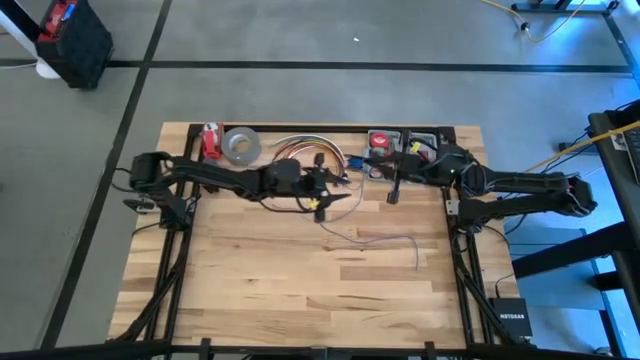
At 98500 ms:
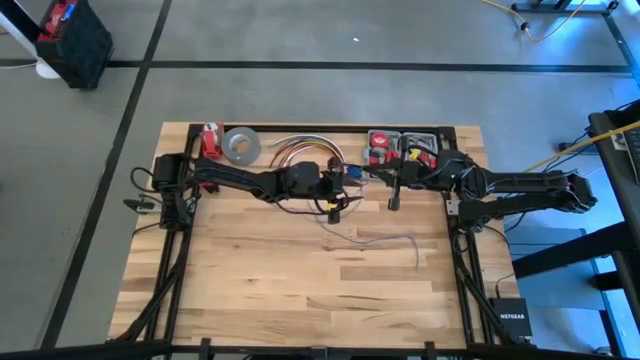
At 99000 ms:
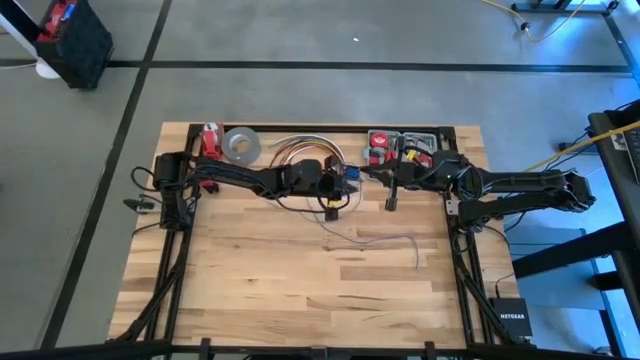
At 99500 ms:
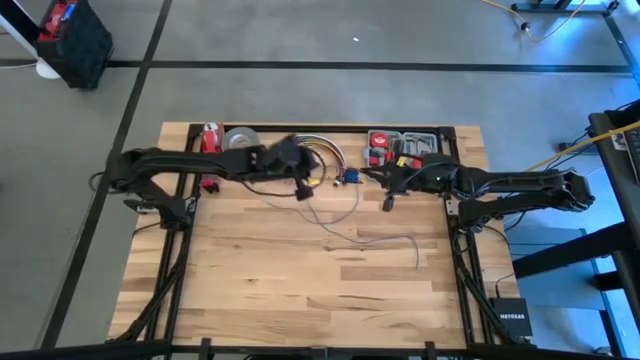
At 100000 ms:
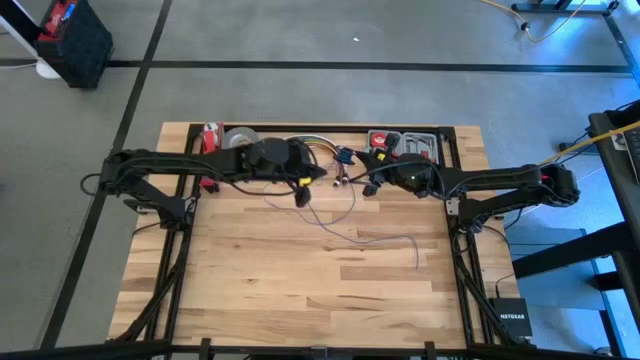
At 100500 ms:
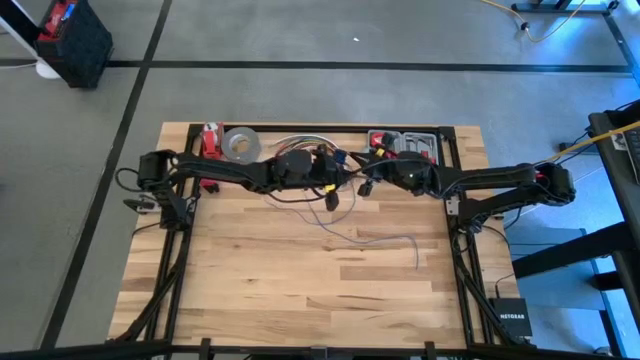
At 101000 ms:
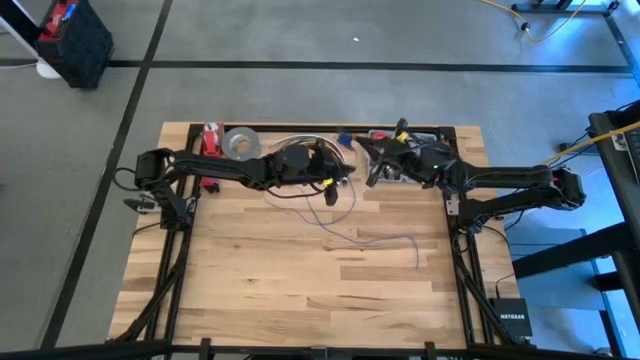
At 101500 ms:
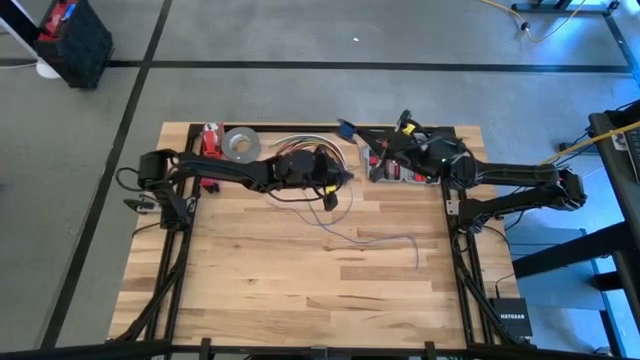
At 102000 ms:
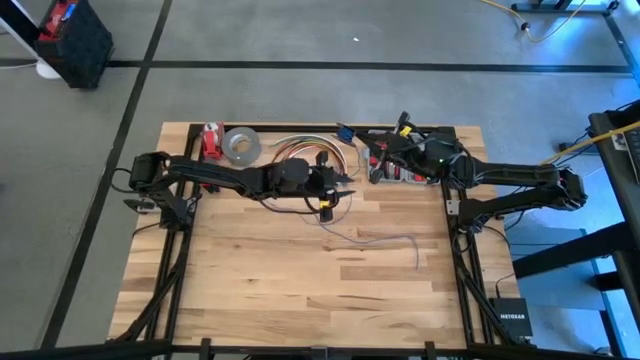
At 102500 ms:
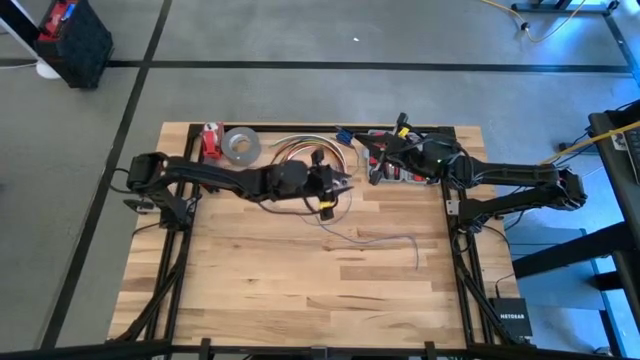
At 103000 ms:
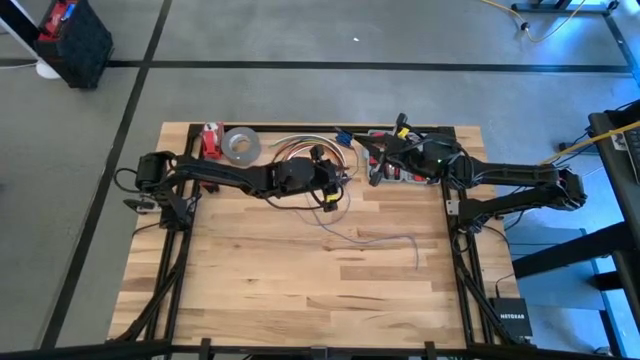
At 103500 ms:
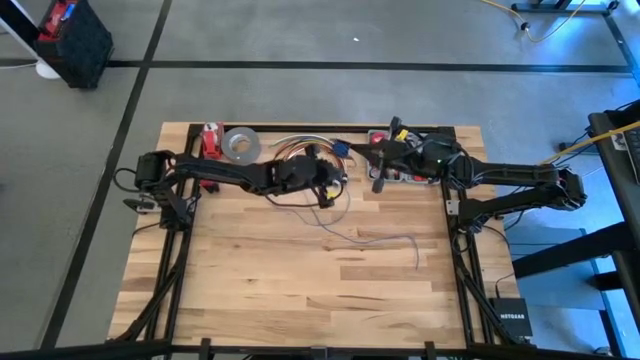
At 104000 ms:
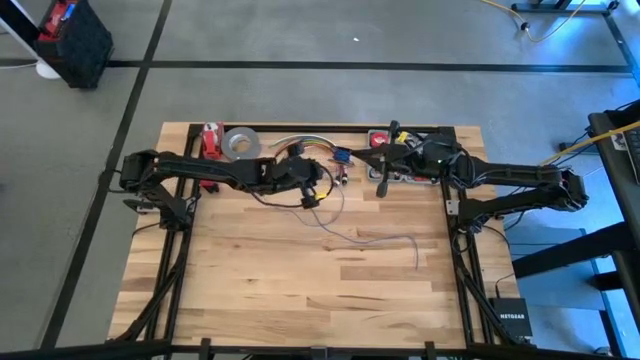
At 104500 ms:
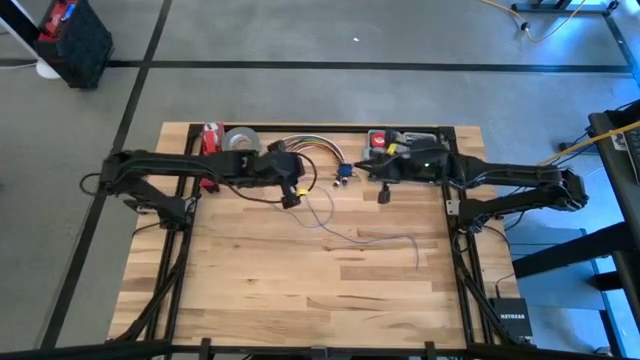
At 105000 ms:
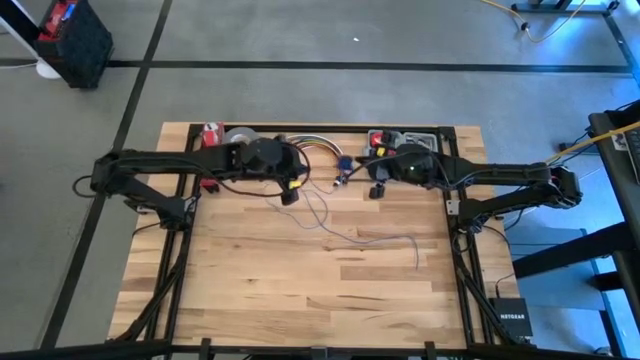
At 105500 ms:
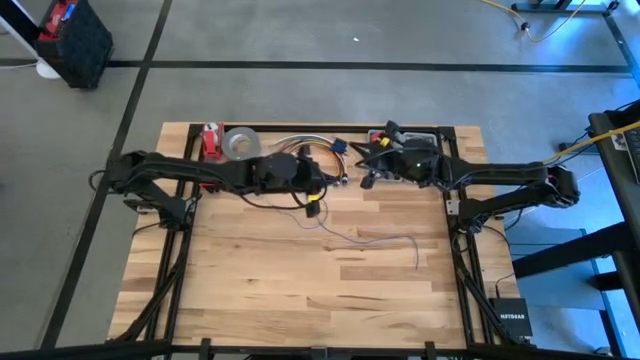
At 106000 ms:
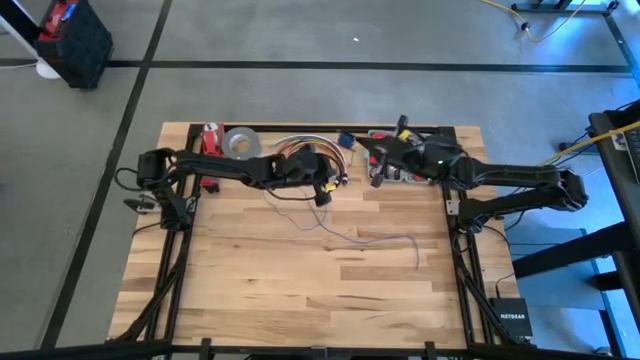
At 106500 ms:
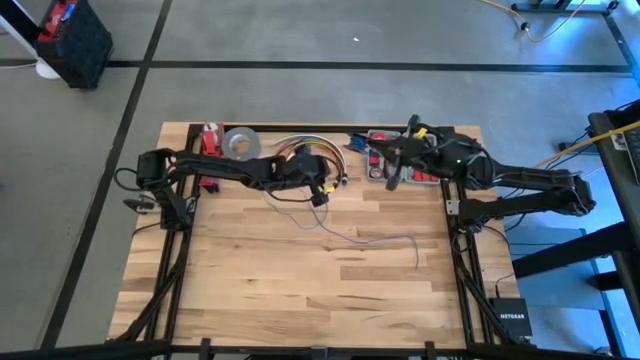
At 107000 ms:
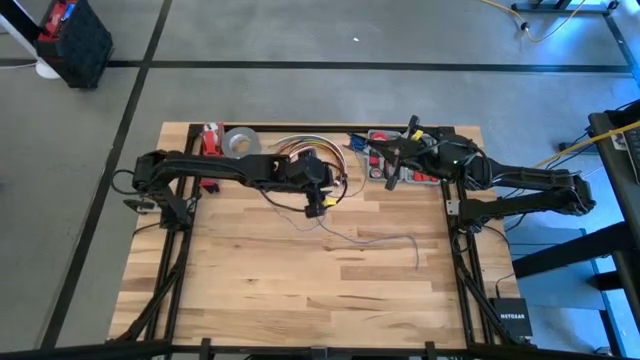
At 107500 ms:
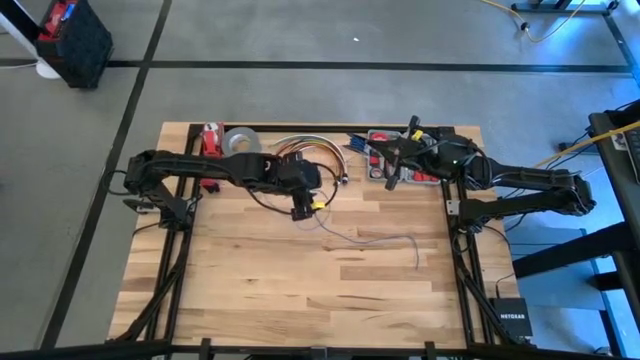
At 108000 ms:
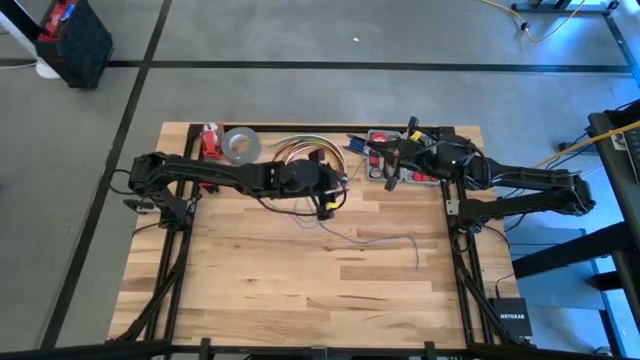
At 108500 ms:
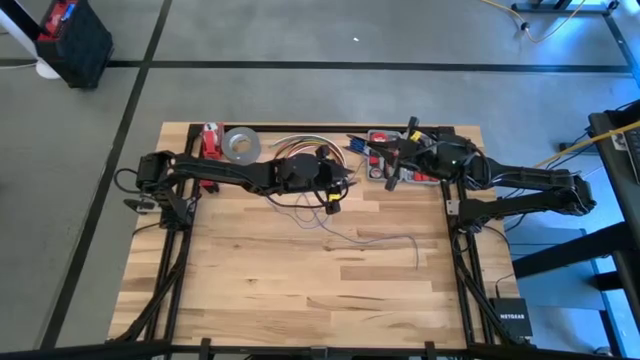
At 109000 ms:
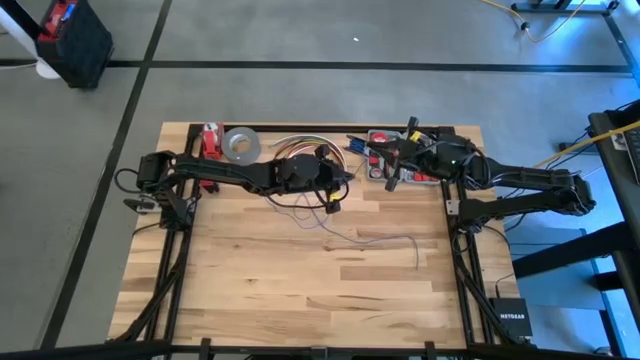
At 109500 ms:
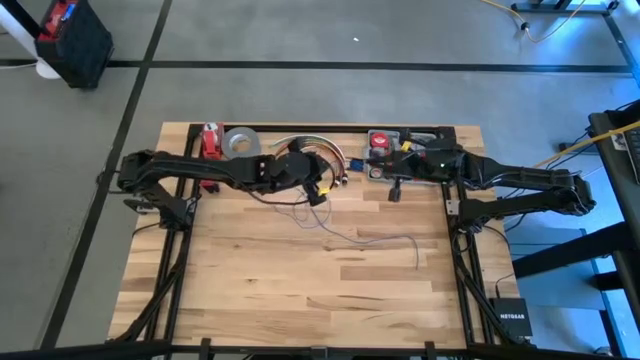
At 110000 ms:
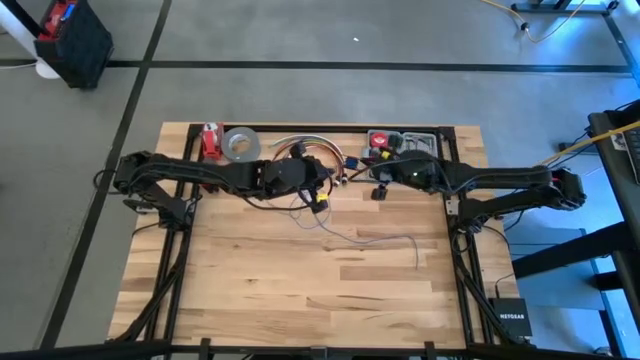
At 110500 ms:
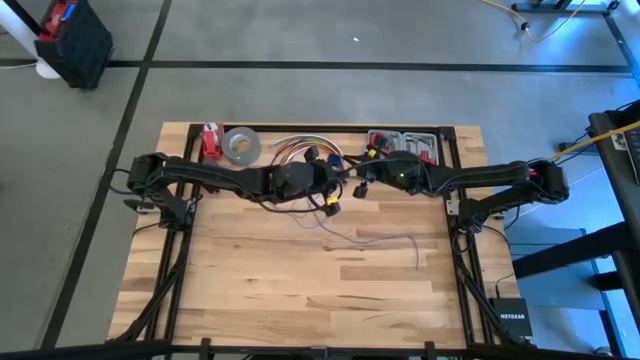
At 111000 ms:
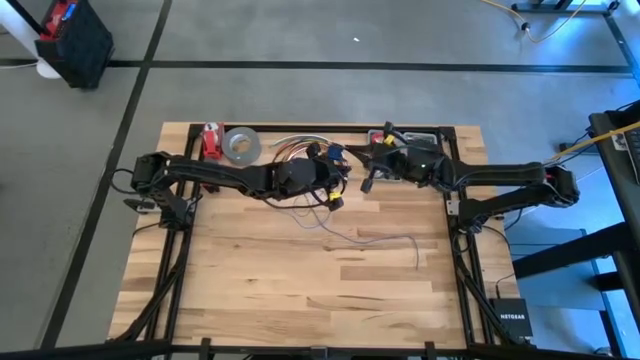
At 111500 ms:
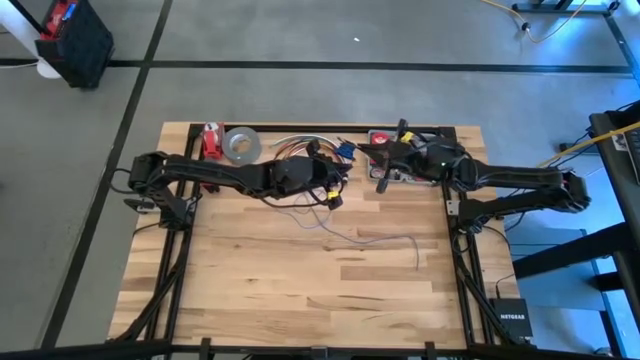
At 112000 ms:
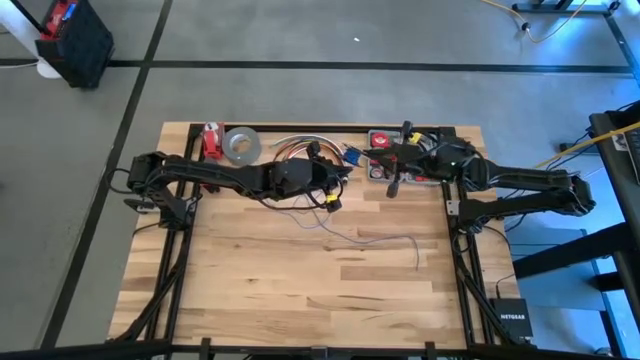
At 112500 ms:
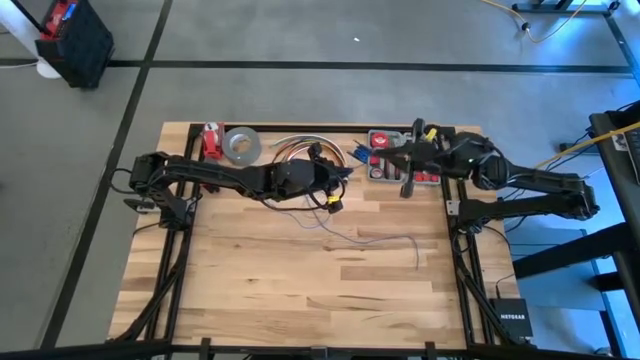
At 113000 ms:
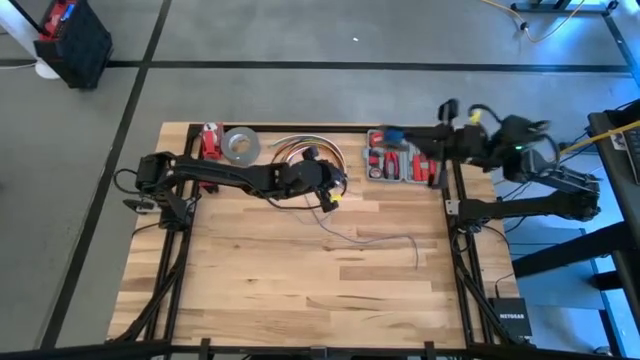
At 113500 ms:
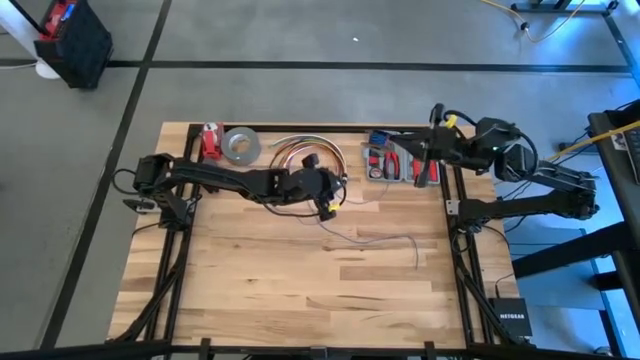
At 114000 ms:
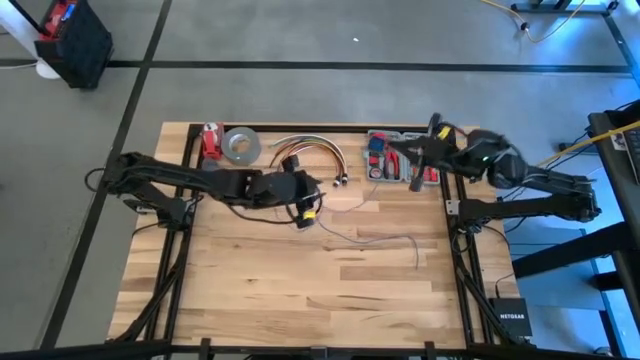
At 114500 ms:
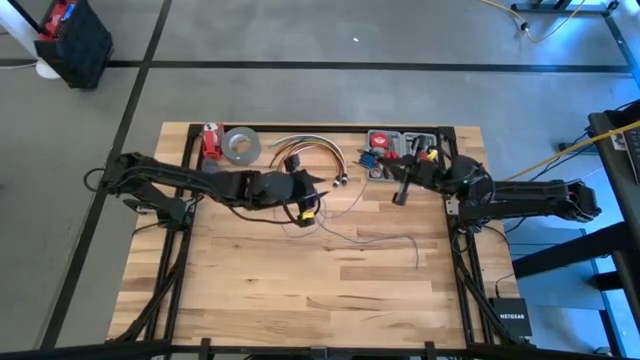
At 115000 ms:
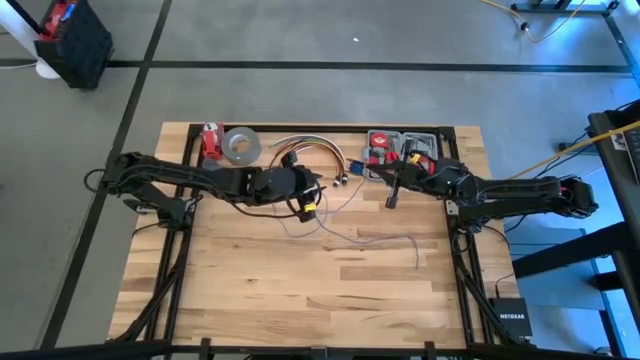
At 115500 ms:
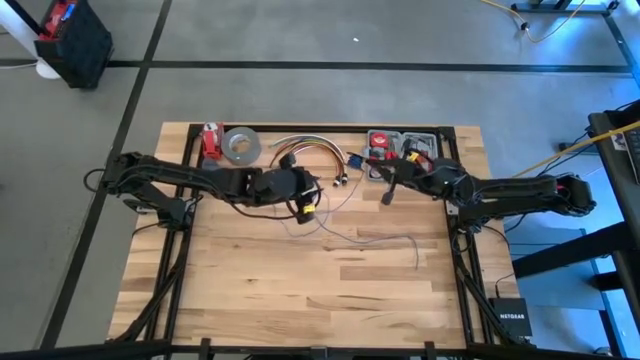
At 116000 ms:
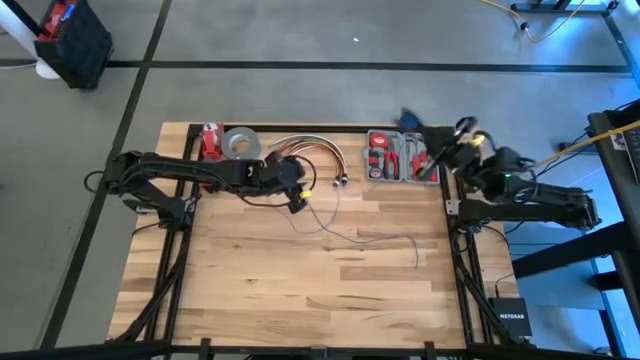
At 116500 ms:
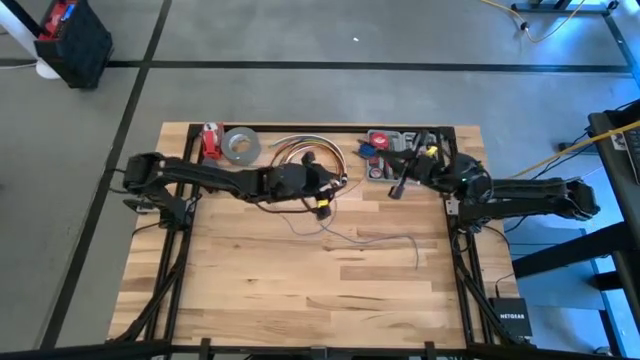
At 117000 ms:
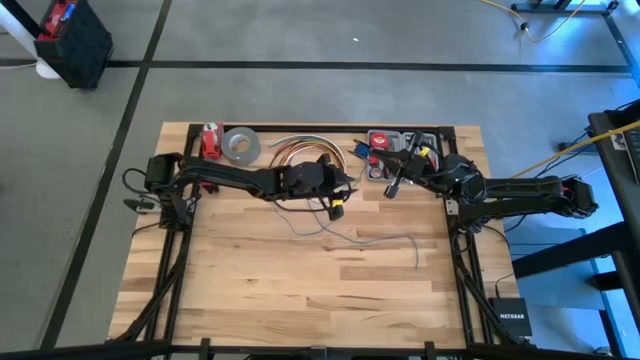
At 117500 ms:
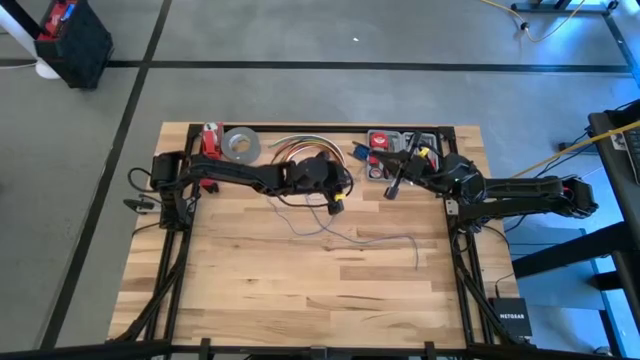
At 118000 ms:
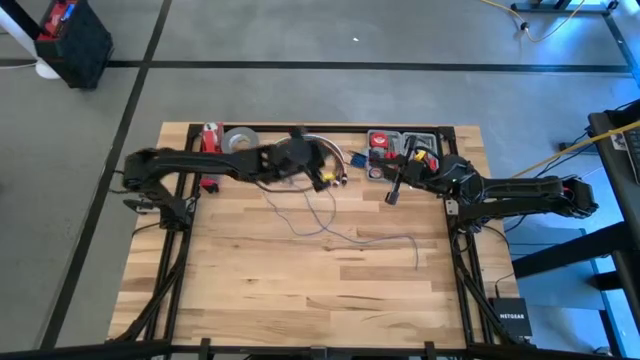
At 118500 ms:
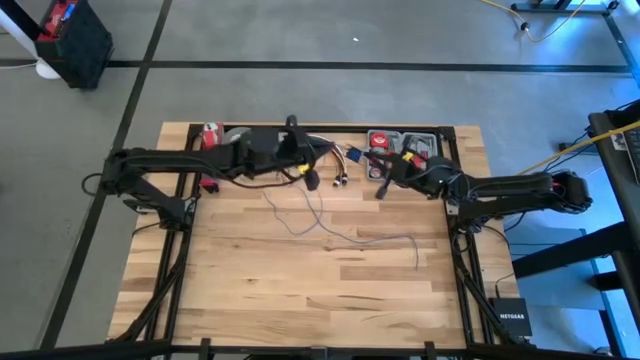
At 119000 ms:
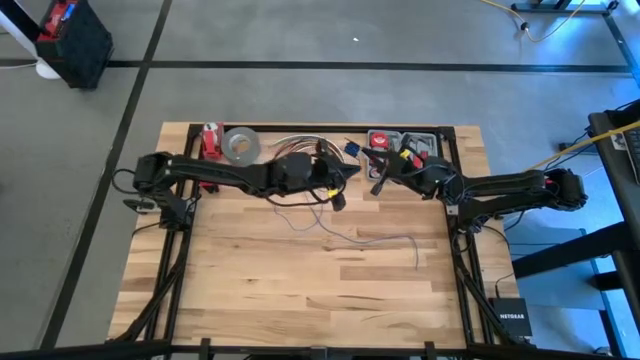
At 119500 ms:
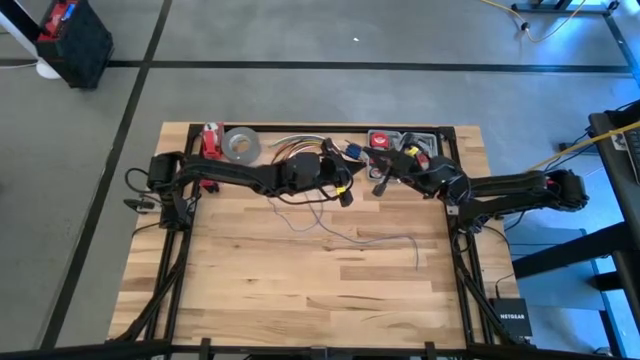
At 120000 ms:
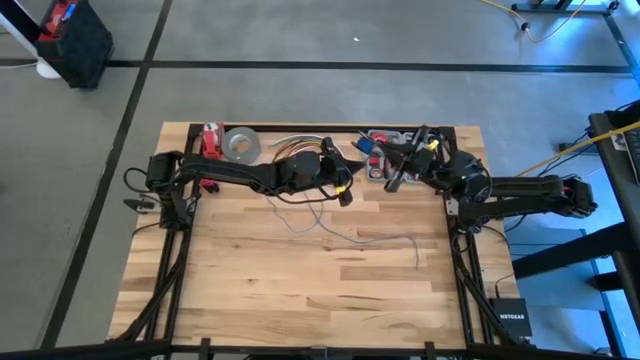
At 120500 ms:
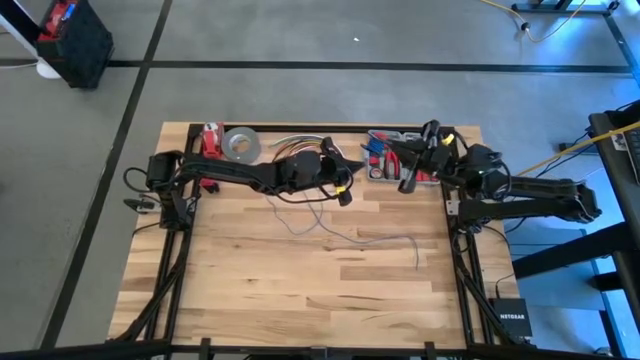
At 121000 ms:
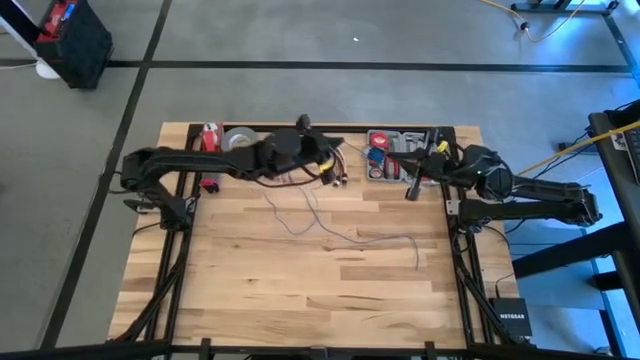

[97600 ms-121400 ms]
Task: Coil cords
Coil the blue wire on the black spool
